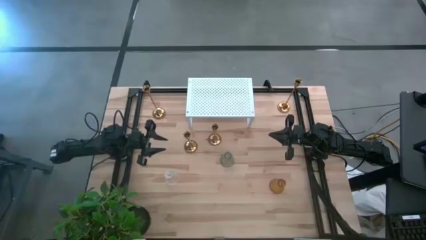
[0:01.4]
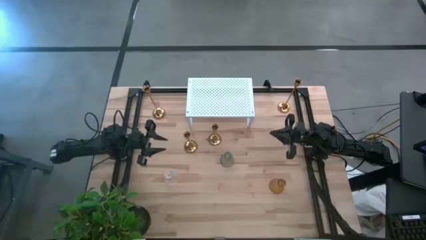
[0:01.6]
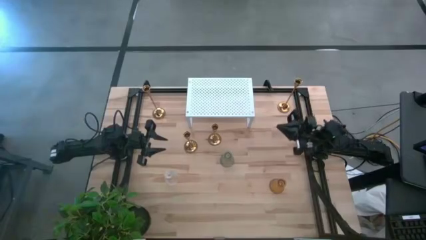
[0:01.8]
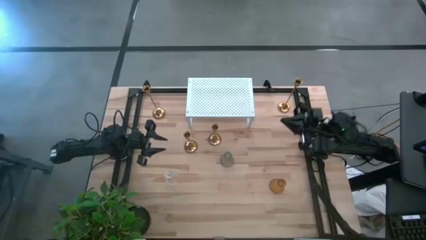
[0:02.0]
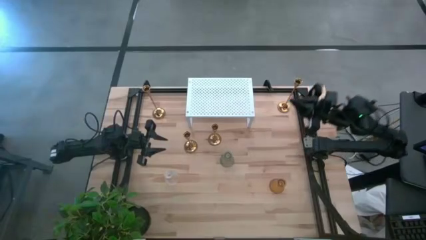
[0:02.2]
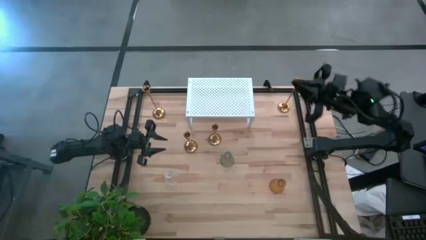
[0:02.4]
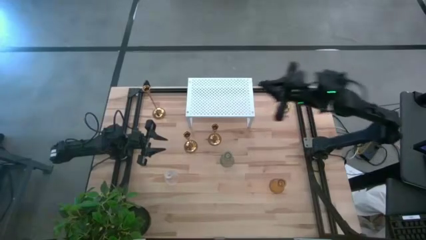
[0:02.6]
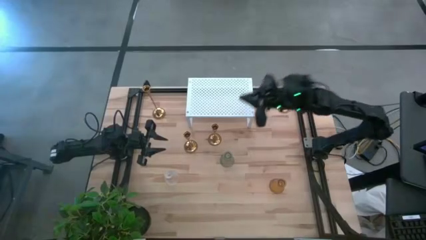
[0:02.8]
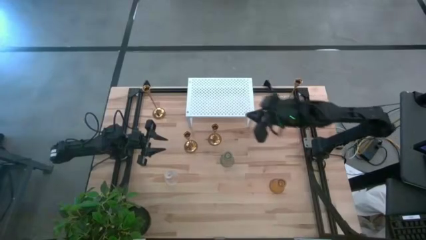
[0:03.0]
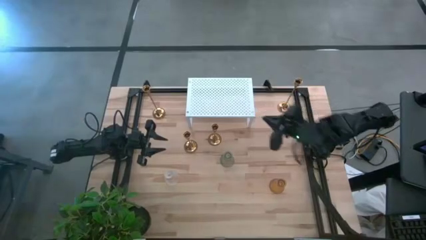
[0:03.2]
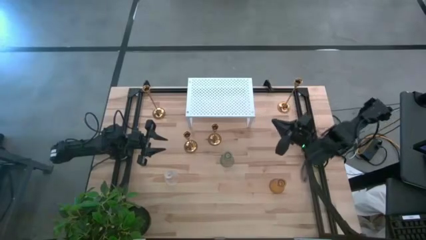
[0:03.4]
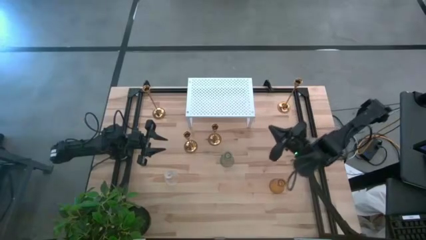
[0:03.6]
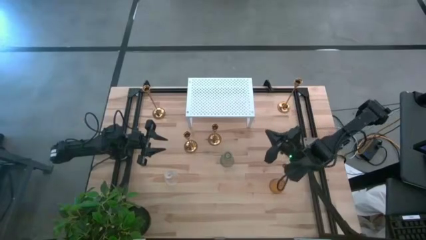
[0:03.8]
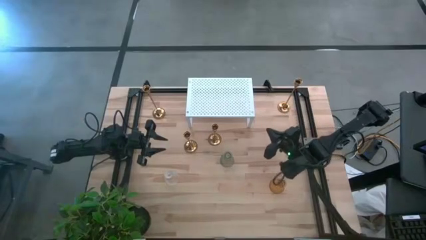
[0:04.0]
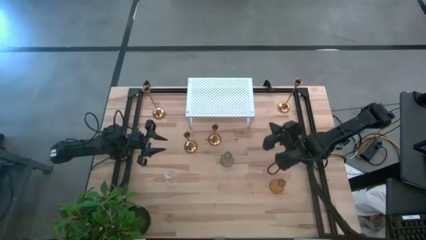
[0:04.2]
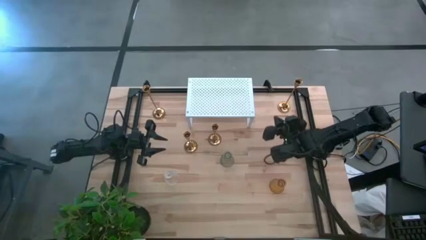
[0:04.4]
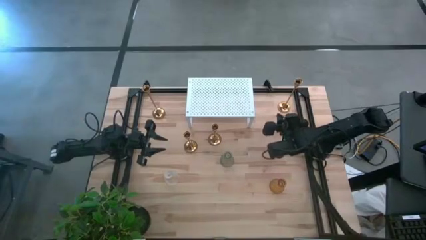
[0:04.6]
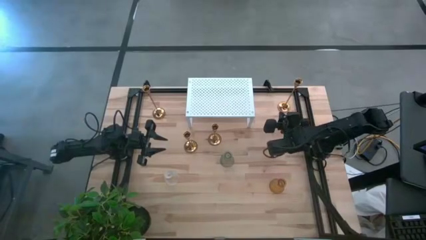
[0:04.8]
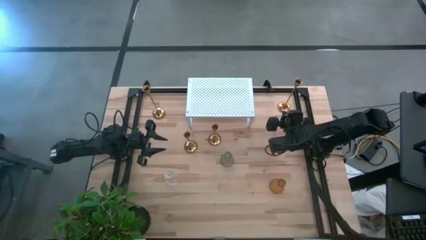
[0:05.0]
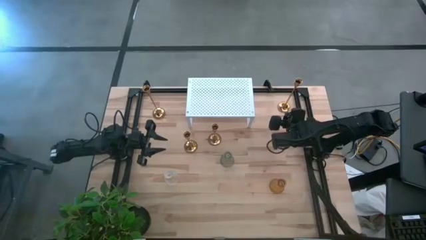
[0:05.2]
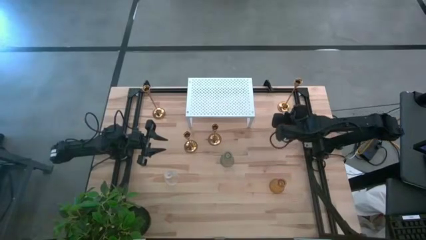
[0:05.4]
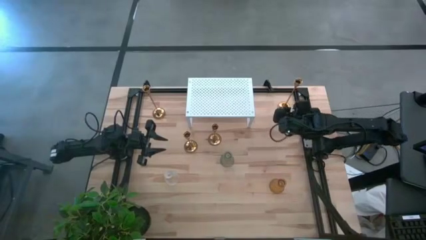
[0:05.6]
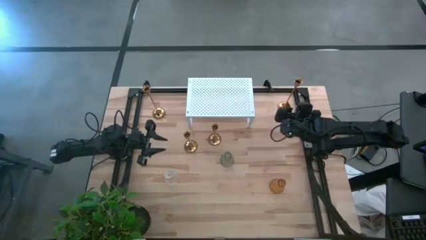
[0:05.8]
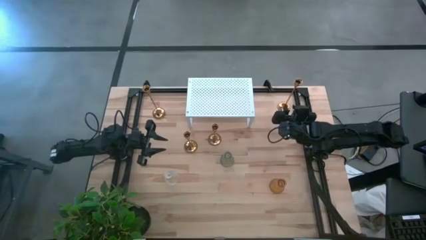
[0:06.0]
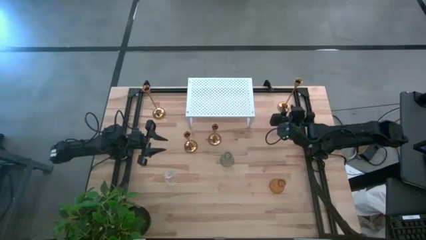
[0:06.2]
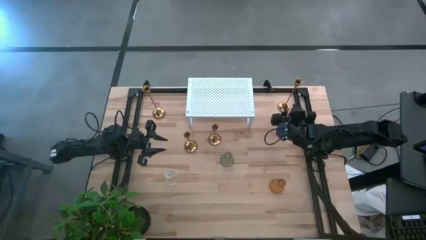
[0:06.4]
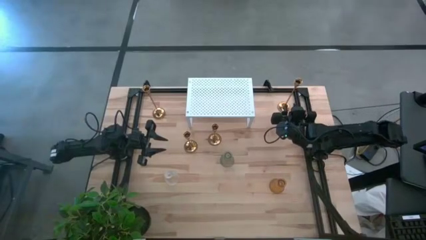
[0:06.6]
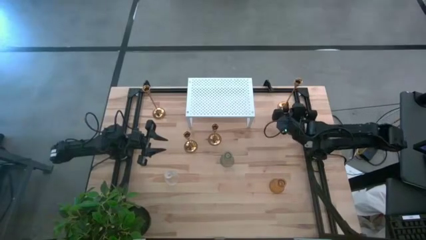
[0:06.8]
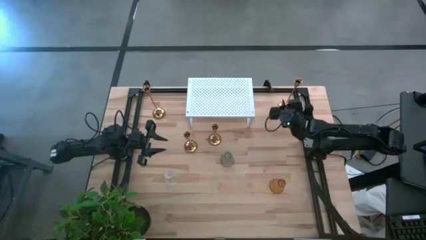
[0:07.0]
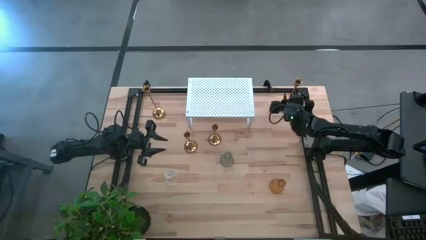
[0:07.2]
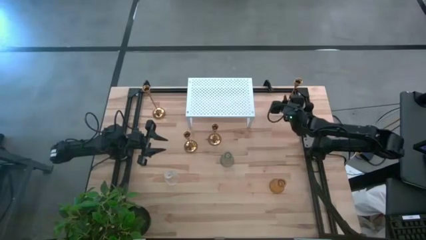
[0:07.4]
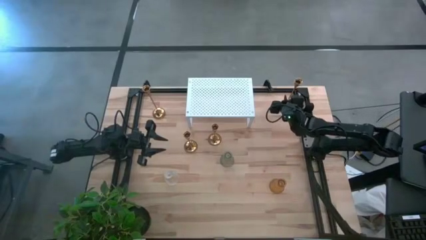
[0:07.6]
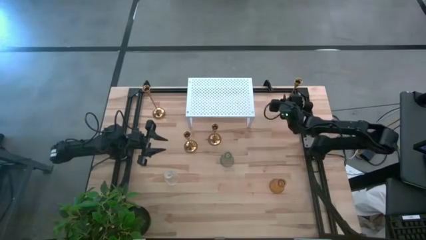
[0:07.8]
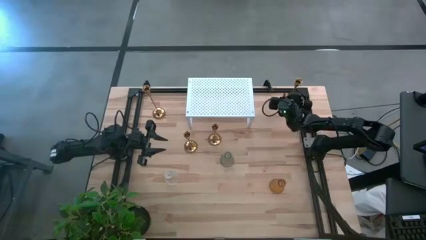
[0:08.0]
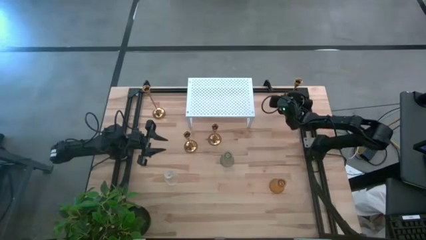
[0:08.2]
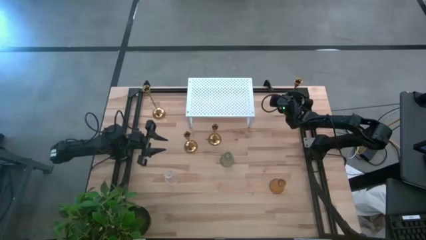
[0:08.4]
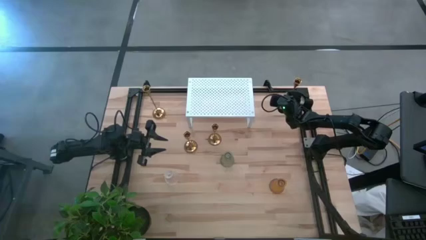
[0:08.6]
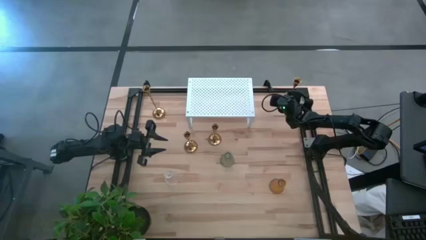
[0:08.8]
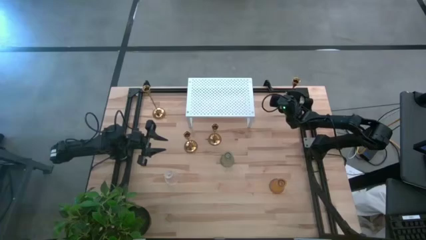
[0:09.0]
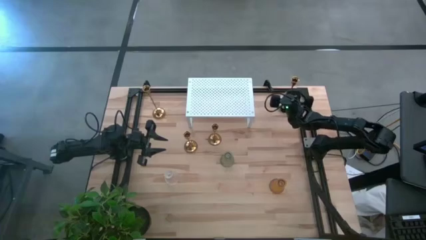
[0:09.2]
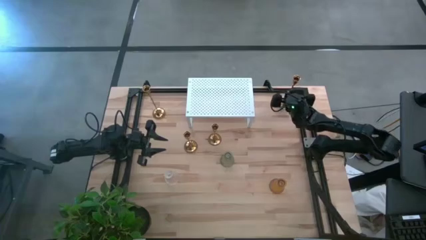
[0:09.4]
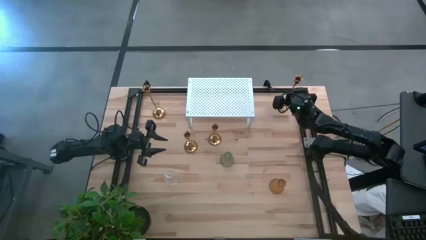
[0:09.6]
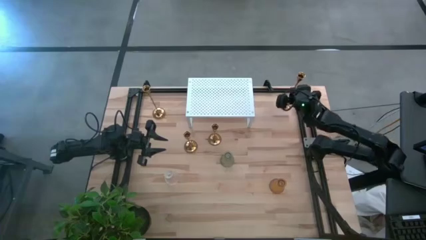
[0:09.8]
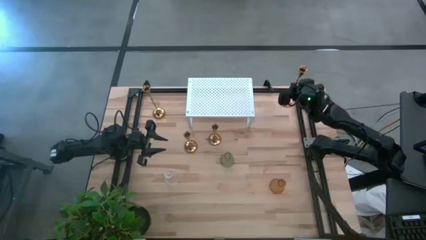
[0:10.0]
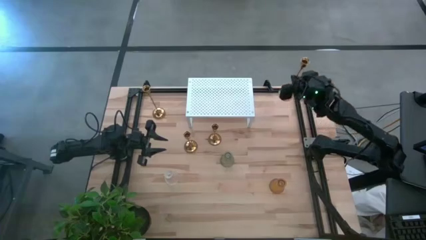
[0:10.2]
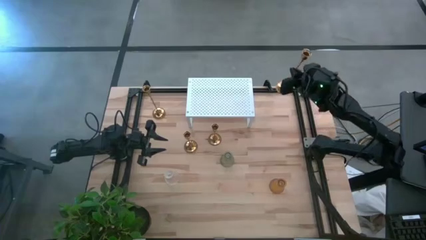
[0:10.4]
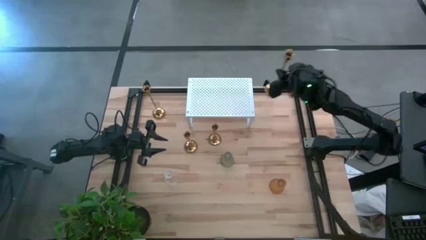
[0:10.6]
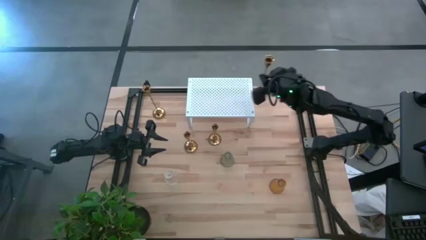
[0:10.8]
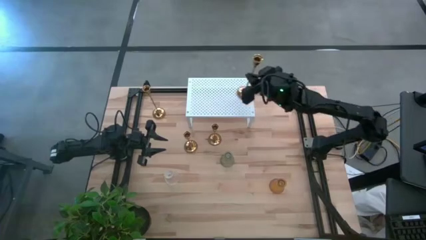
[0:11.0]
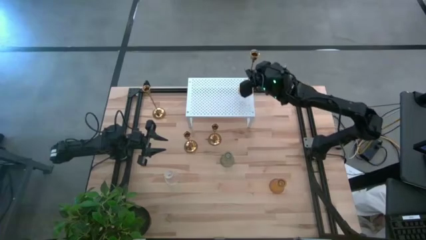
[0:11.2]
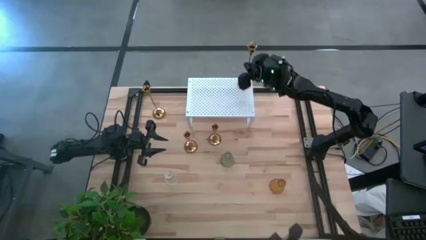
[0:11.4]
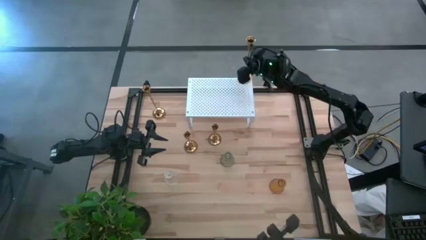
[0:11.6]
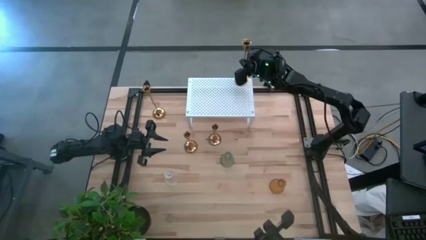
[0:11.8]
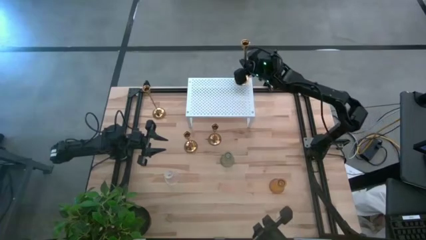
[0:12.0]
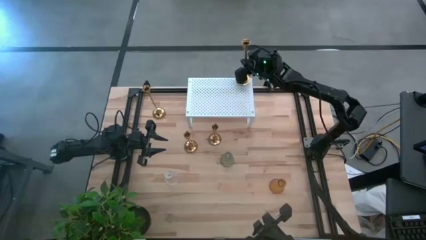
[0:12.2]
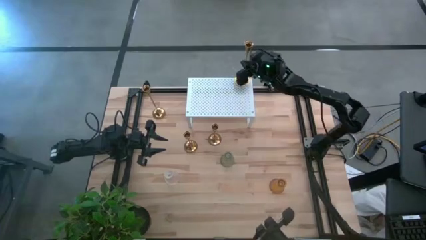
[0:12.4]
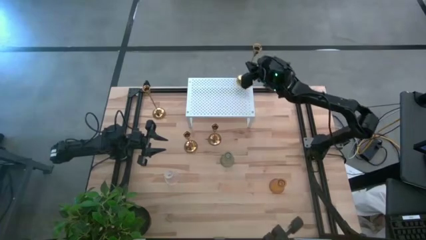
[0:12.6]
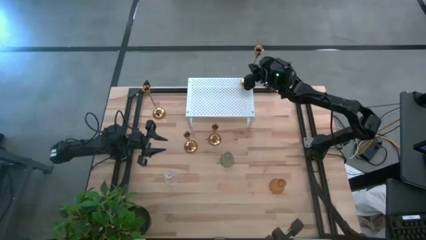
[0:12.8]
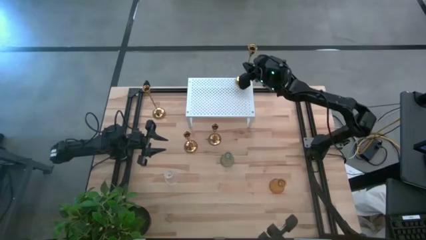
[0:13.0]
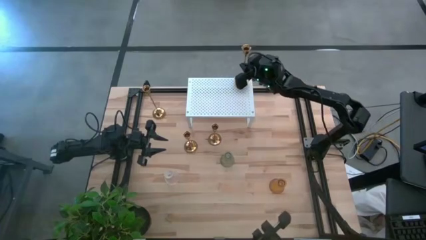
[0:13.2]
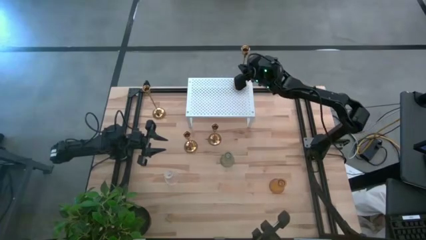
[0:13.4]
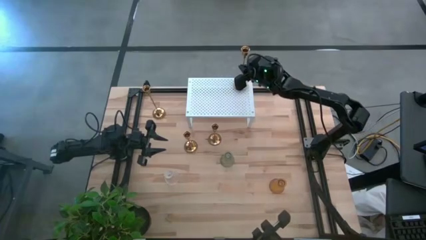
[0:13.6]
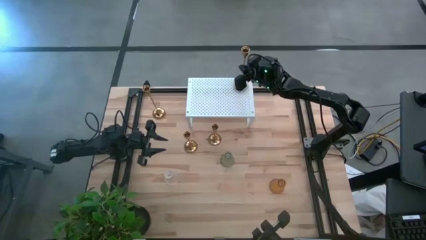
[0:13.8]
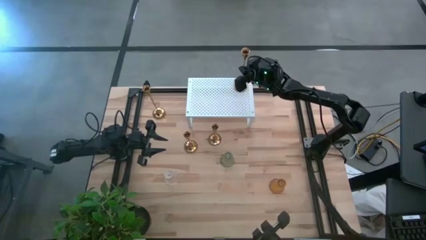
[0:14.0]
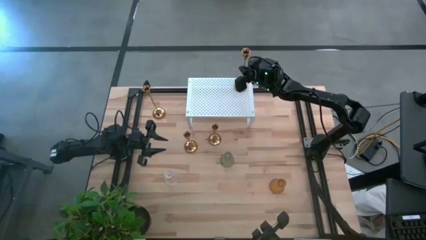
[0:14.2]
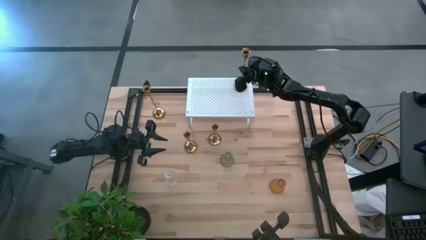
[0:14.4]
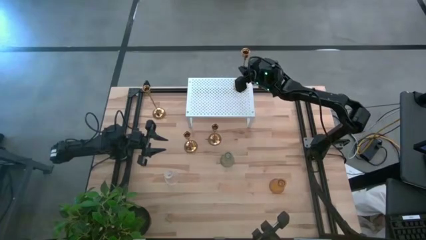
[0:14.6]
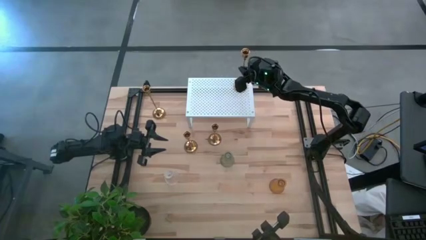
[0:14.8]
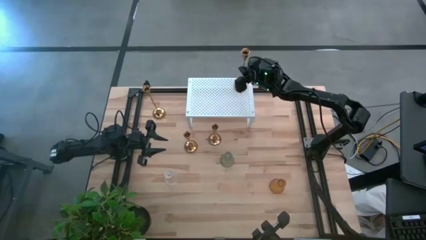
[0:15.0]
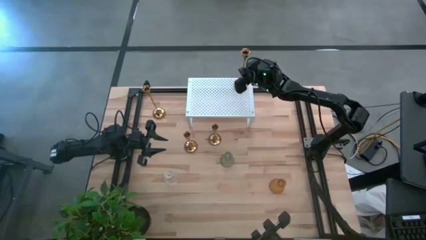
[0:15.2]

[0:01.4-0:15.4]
Task: Pick & Place candle stick holders
Put the right large gold candlestick on the shelf
